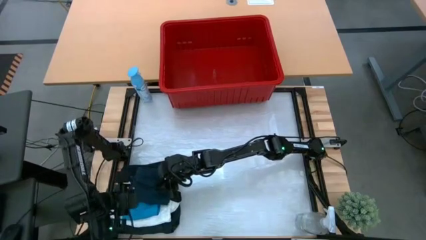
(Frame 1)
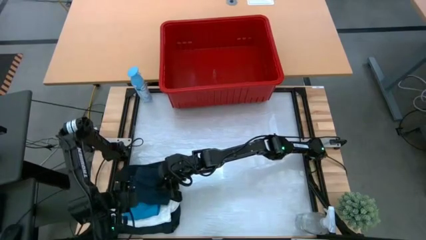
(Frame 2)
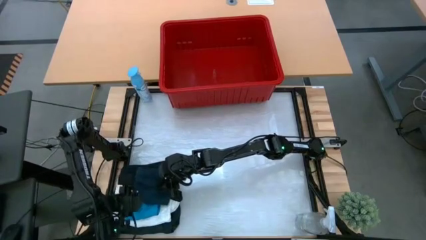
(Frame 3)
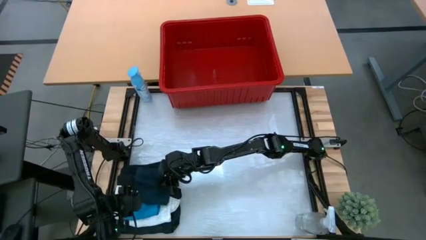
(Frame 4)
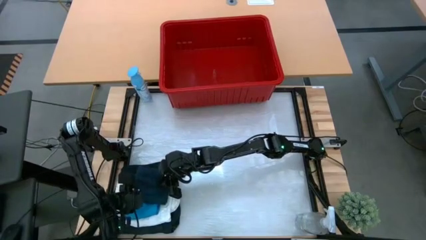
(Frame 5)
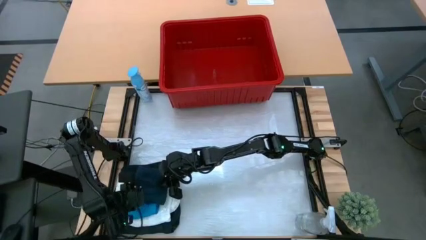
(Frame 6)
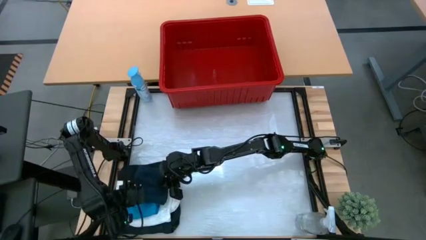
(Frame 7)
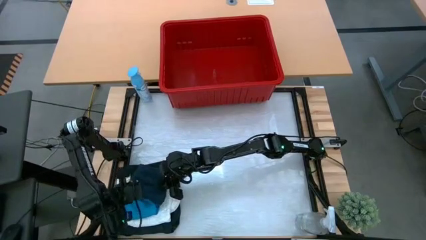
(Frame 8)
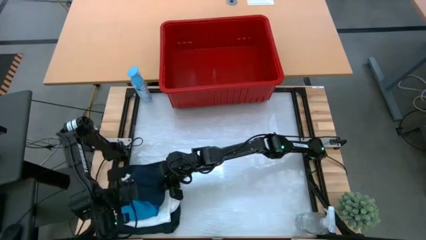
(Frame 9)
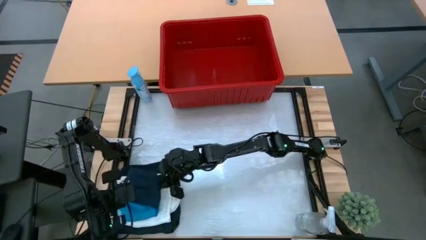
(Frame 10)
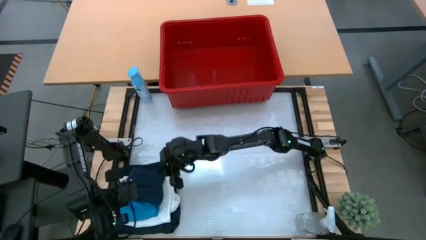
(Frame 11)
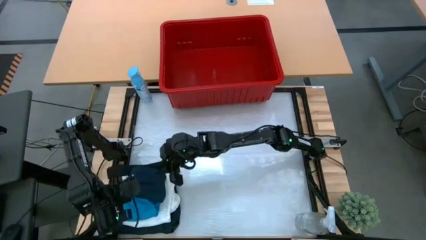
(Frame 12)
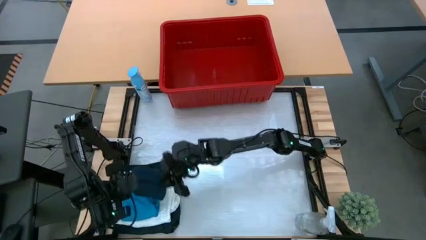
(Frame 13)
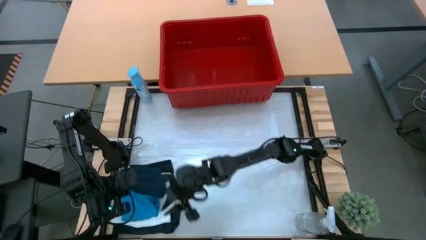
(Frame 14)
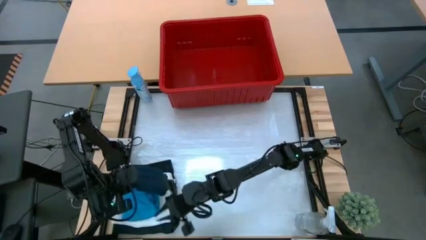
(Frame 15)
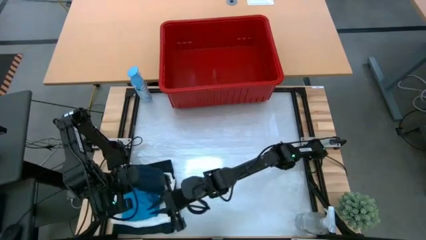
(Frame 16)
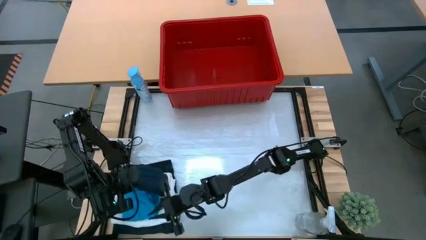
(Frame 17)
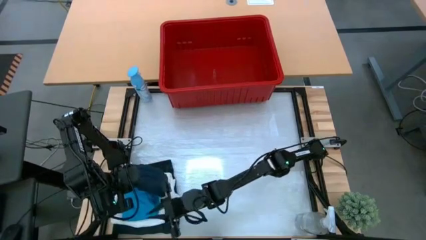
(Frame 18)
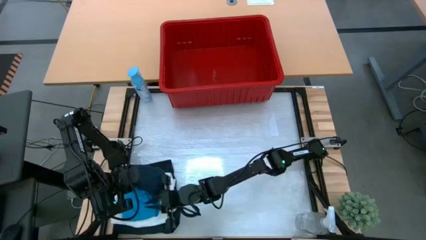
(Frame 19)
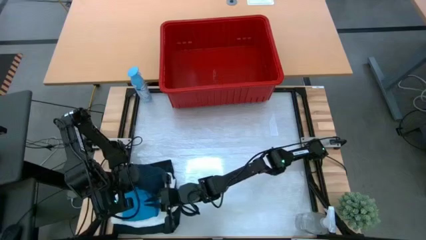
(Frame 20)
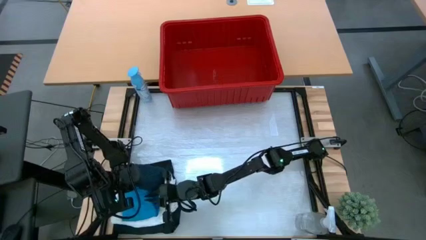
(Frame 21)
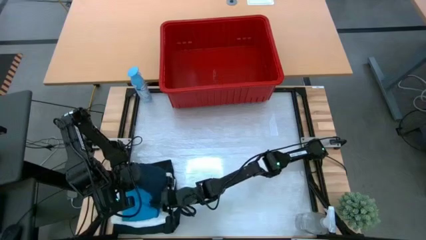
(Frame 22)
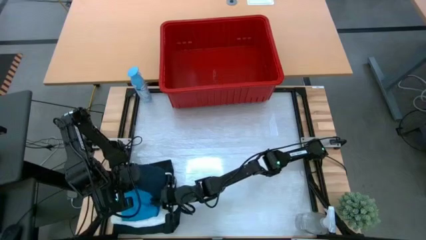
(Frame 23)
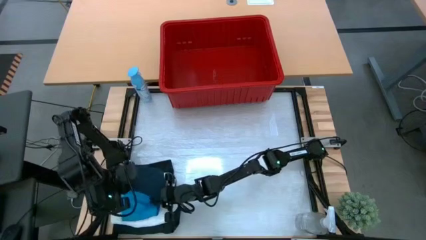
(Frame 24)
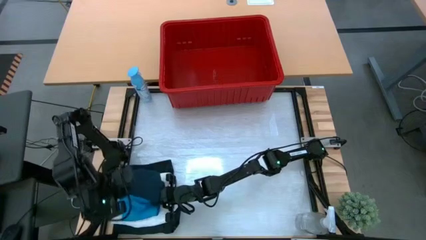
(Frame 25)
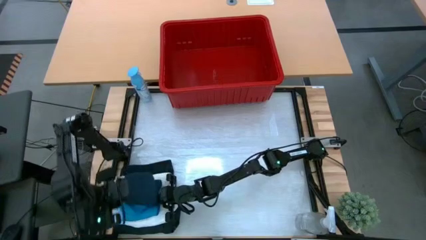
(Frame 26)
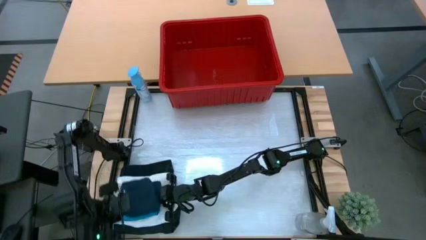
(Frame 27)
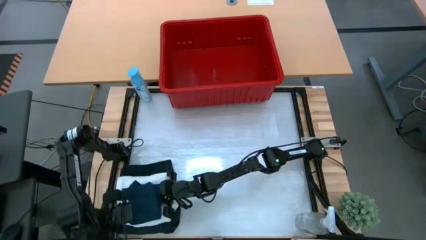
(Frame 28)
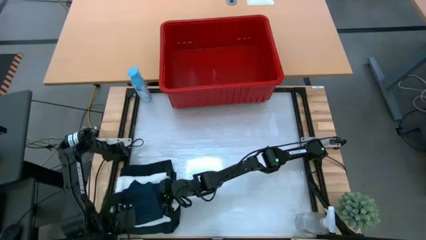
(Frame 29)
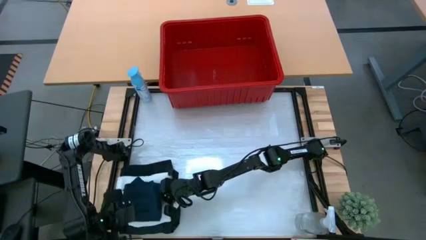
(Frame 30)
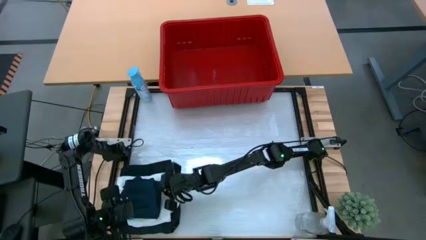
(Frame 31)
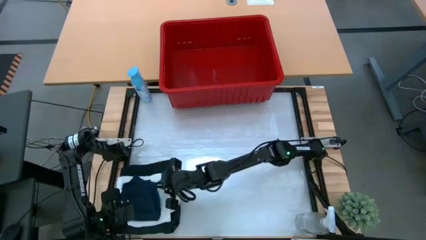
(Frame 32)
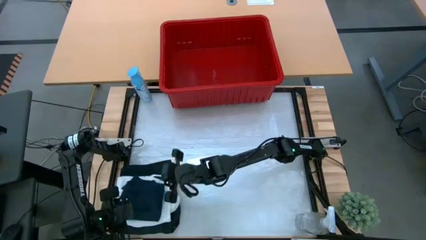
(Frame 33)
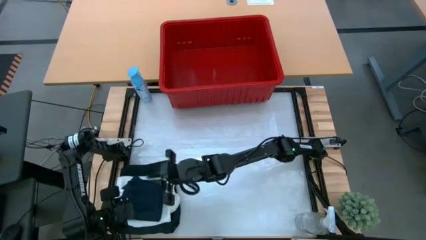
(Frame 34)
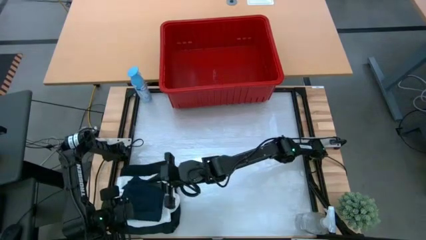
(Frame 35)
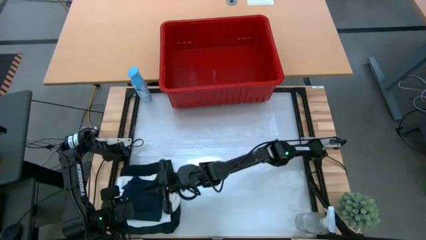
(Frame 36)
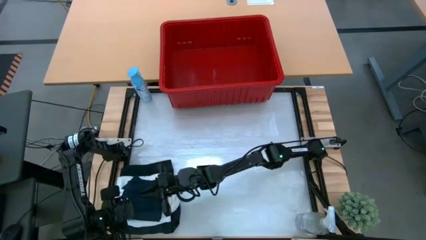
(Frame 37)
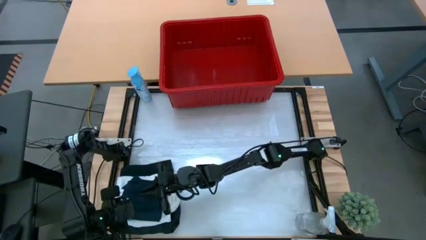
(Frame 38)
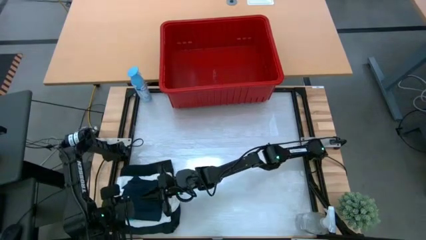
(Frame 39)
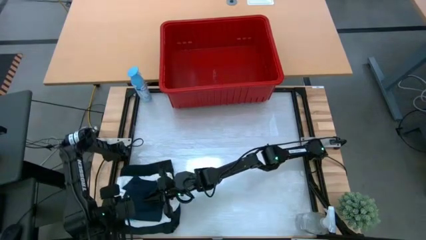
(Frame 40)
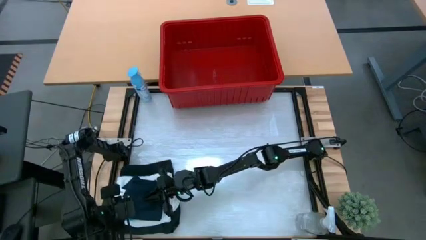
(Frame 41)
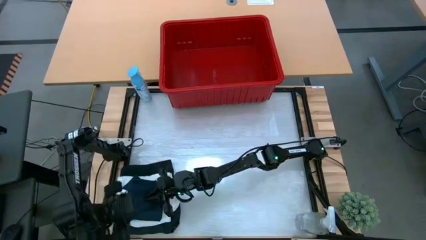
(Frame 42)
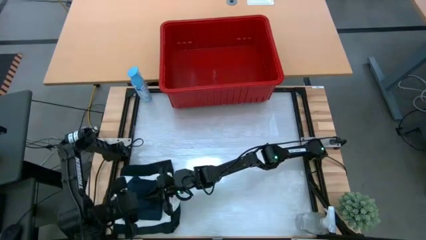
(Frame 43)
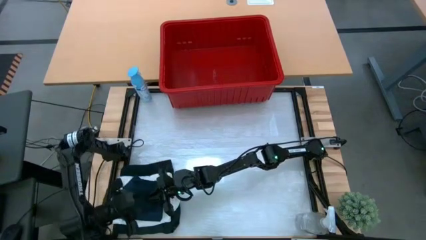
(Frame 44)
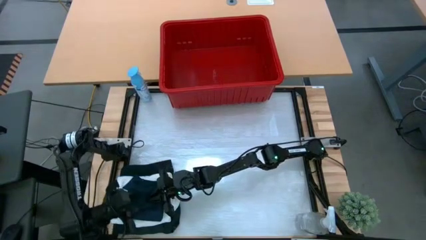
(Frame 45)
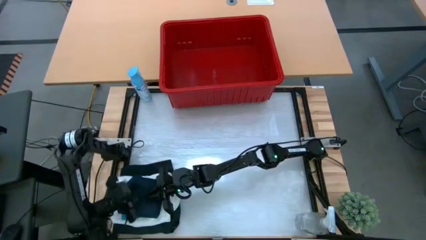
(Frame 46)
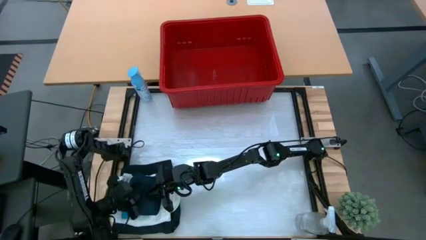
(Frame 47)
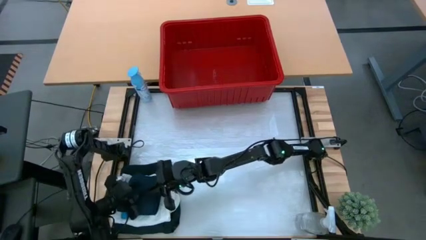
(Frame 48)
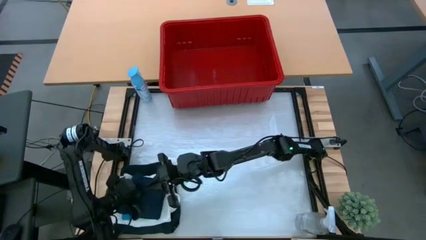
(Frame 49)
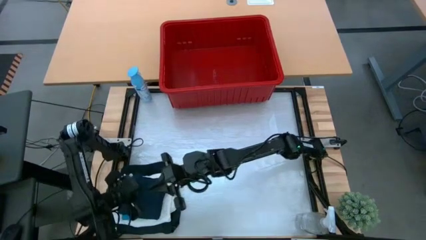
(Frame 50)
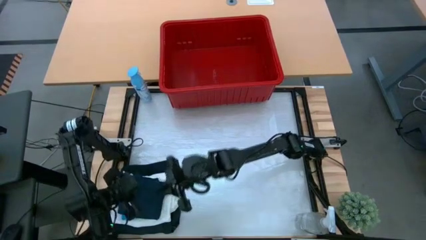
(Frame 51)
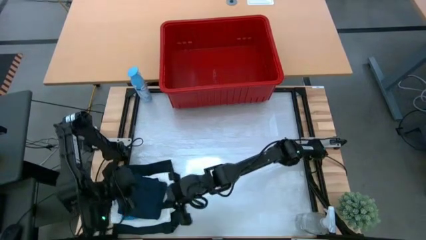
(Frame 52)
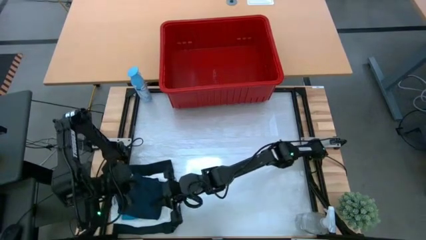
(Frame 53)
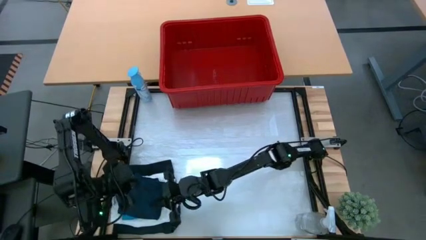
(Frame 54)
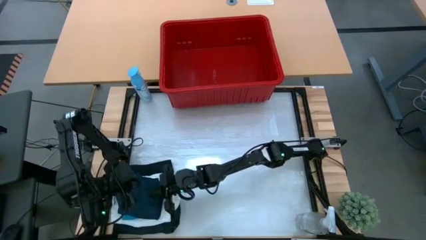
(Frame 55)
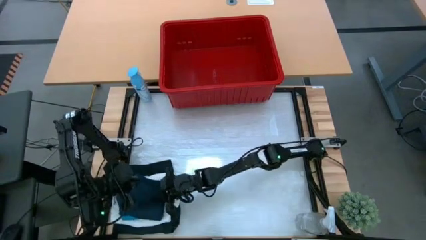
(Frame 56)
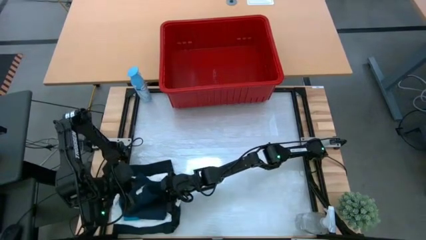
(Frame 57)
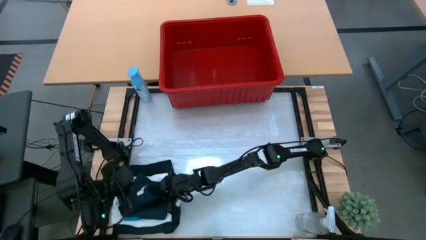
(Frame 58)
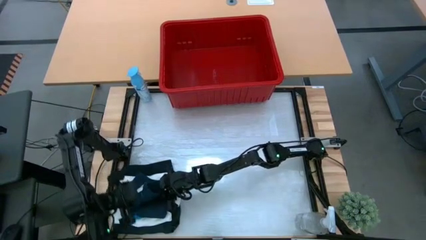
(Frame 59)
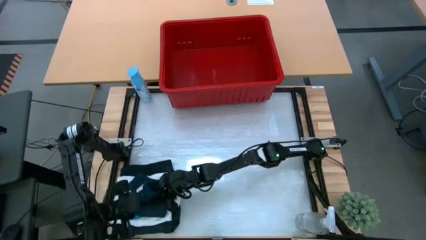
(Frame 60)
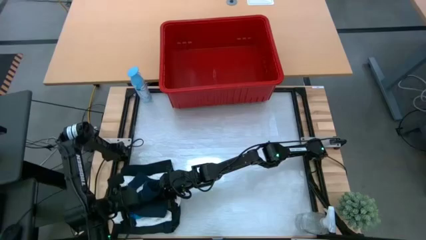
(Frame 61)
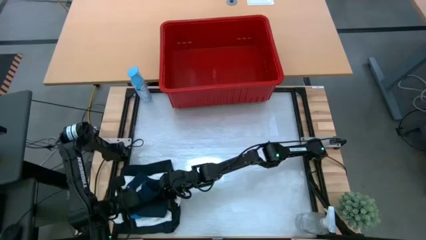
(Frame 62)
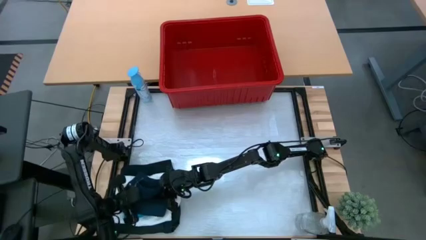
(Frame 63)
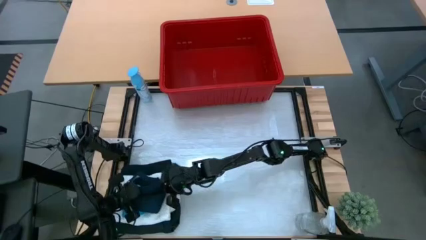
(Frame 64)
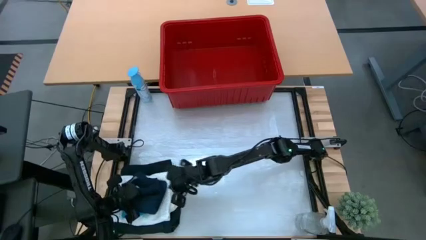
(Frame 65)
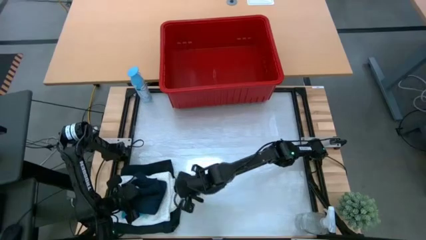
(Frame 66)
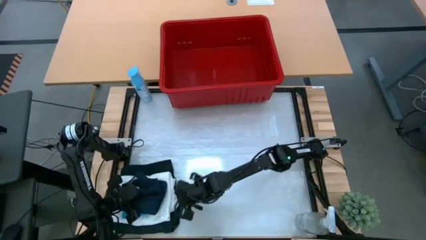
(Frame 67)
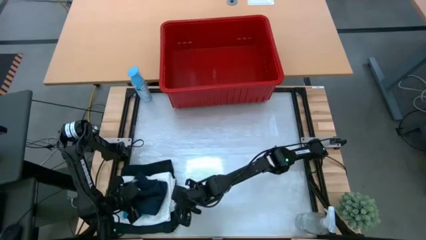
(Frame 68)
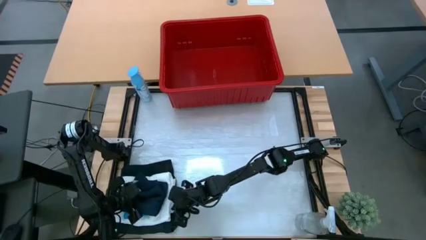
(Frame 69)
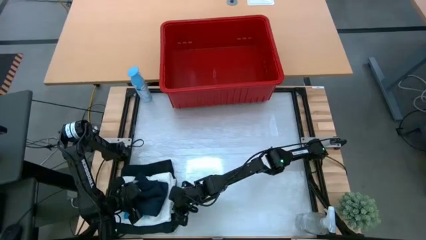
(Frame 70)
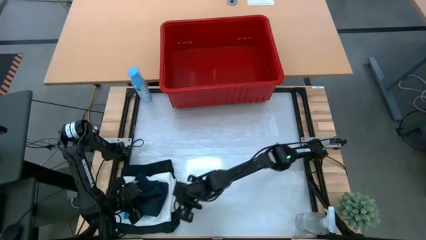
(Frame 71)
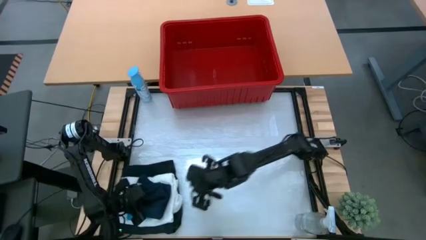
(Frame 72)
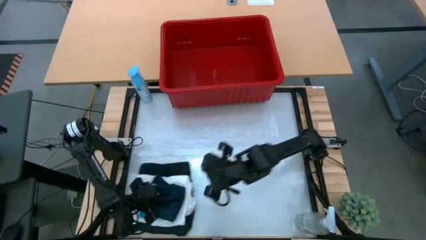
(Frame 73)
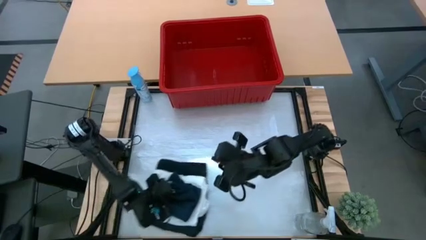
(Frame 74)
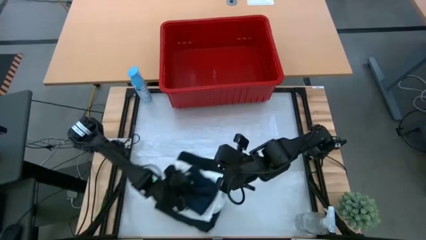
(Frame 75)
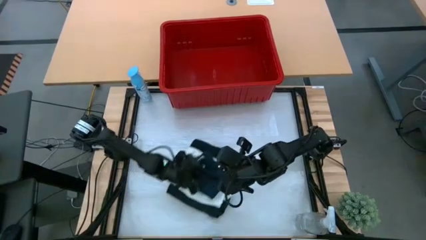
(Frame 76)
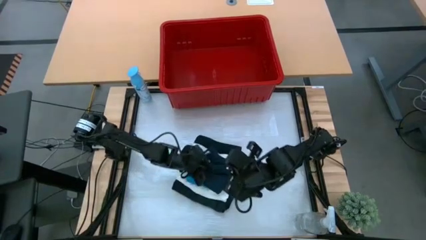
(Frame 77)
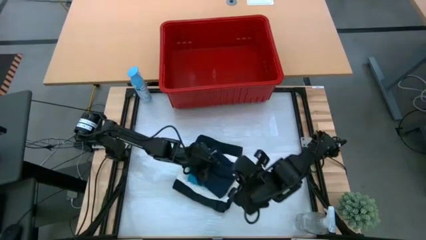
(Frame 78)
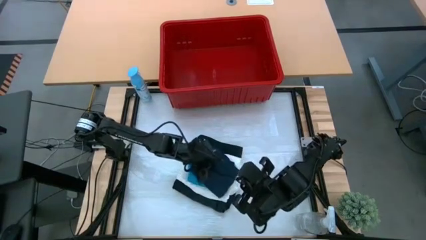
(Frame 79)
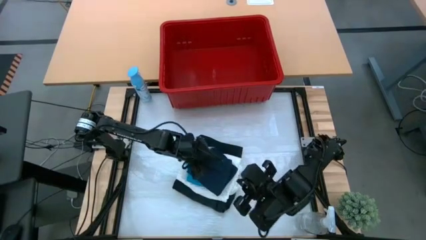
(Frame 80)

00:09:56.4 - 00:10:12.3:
Task: Fold Laundry from Bin
Stack the gray shorts on top of the blue shorts
